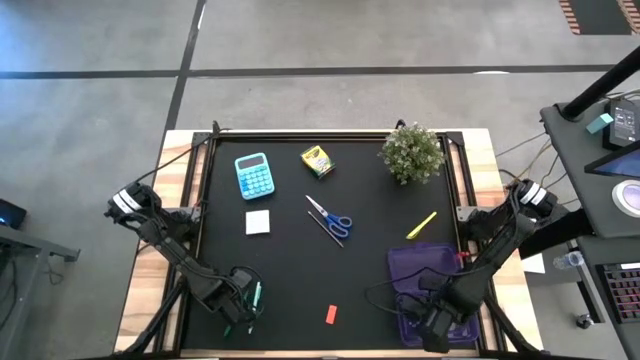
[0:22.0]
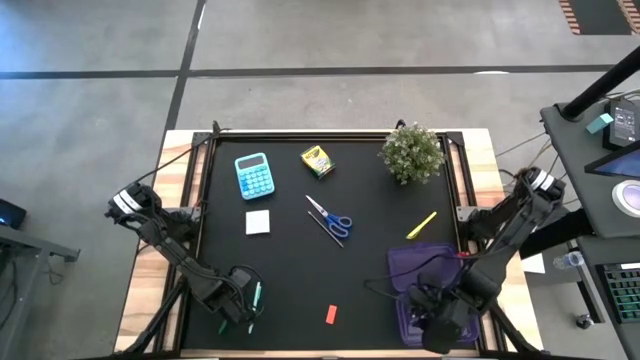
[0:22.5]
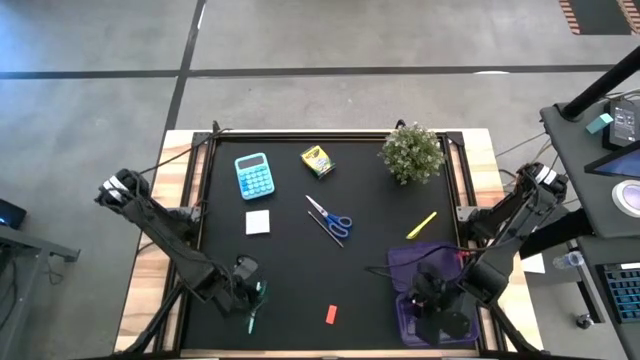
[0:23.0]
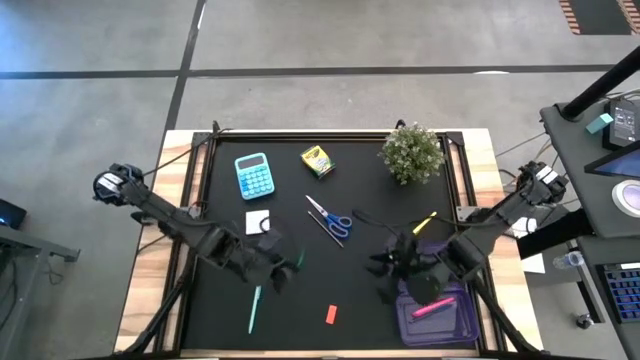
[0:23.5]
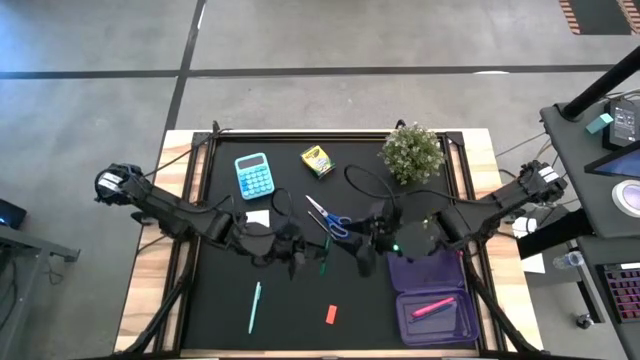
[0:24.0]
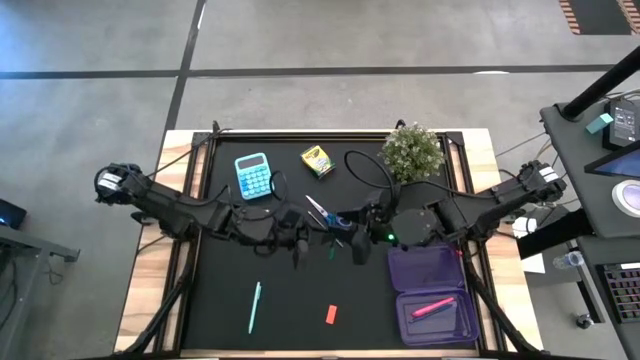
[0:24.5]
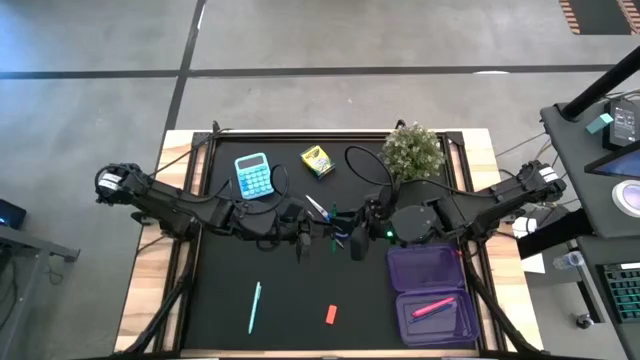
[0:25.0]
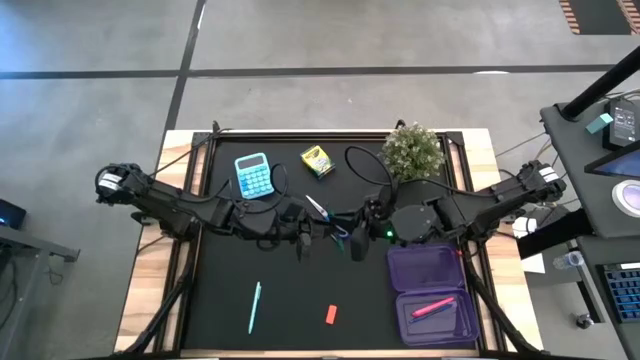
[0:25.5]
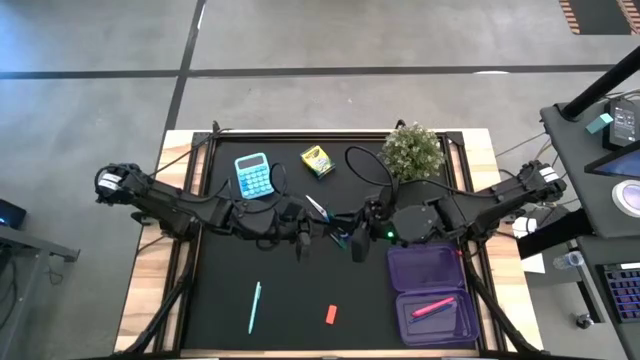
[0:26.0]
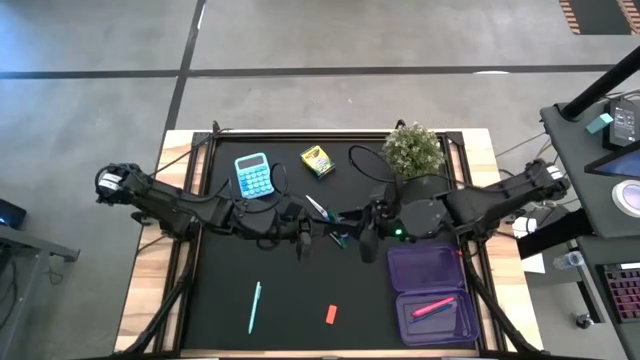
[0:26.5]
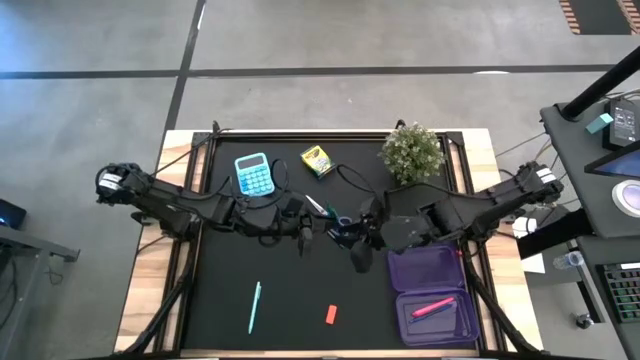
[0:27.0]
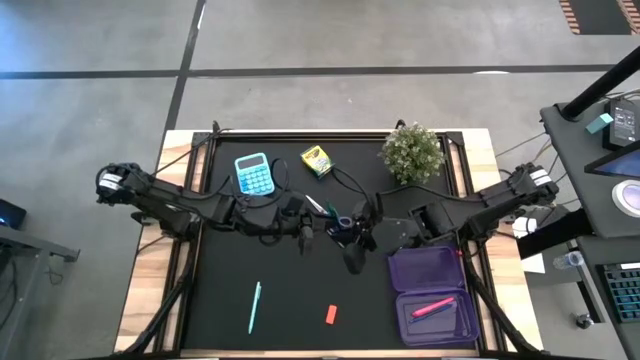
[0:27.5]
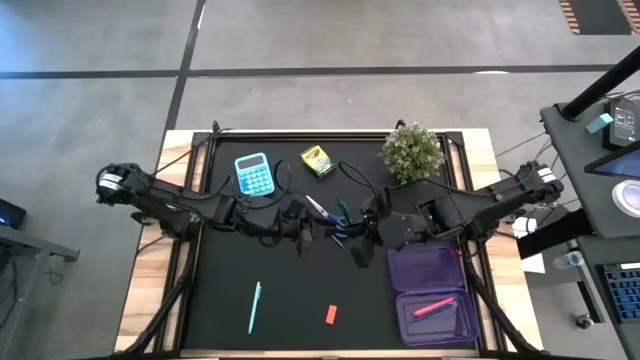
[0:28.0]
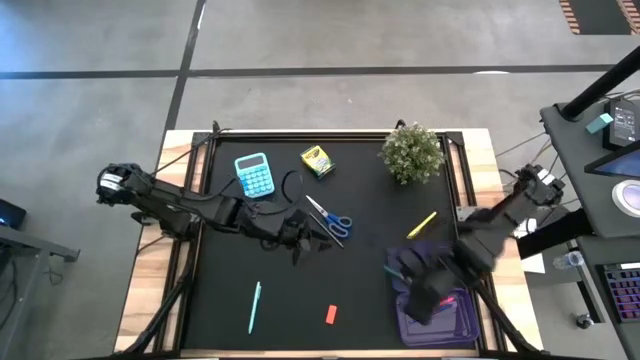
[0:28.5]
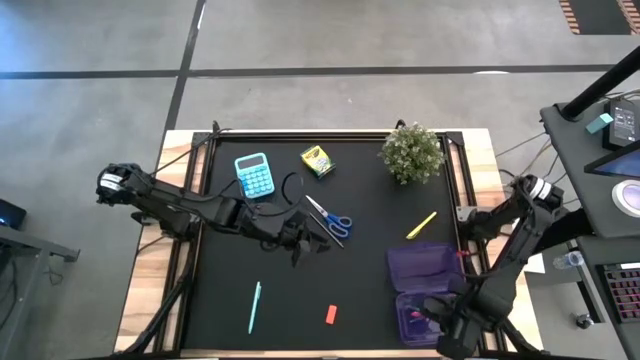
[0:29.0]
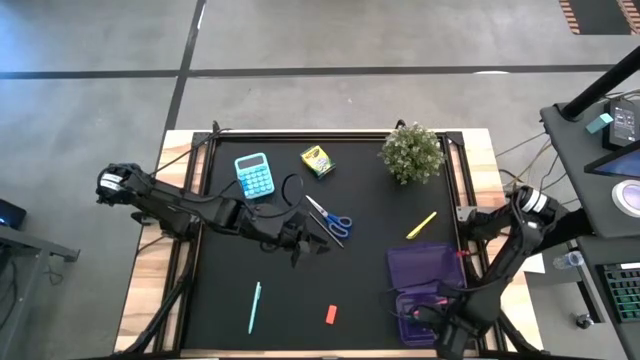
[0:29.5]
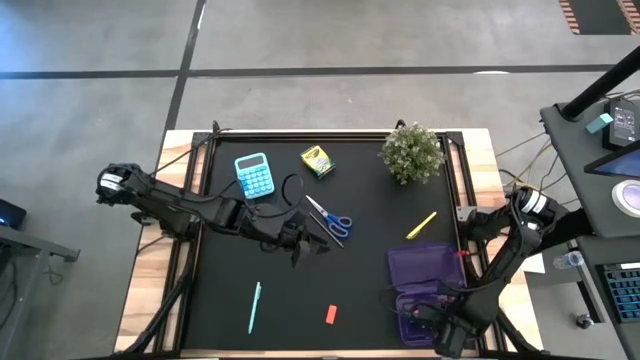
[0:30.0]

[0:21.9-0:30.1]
Task: Pack school essentials
Put the green pen into the supply box

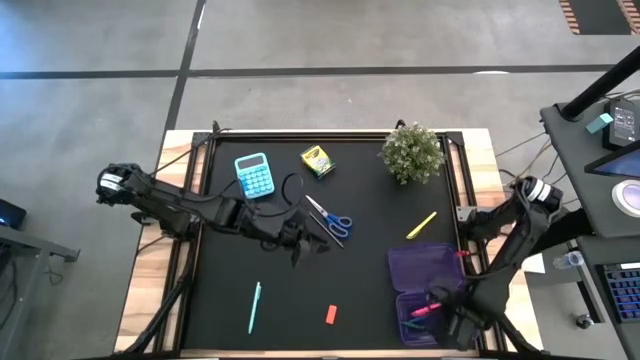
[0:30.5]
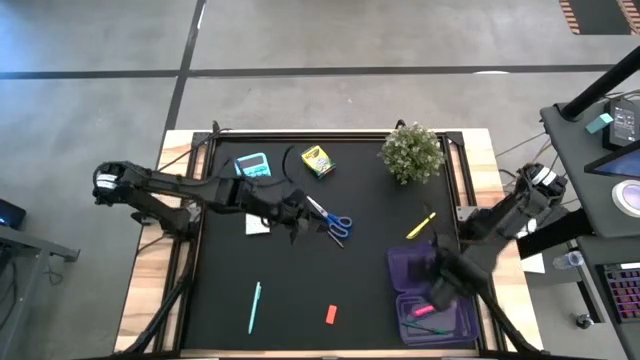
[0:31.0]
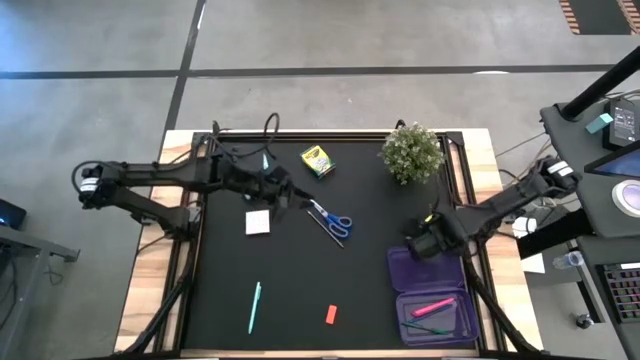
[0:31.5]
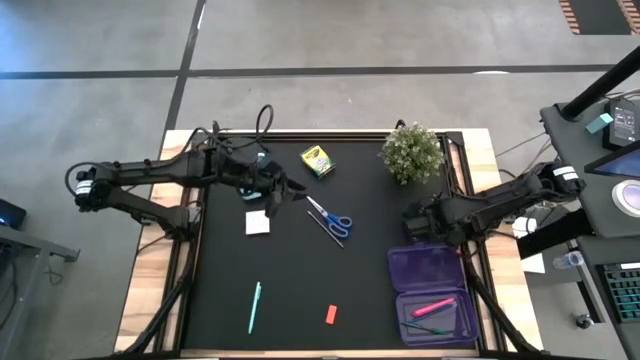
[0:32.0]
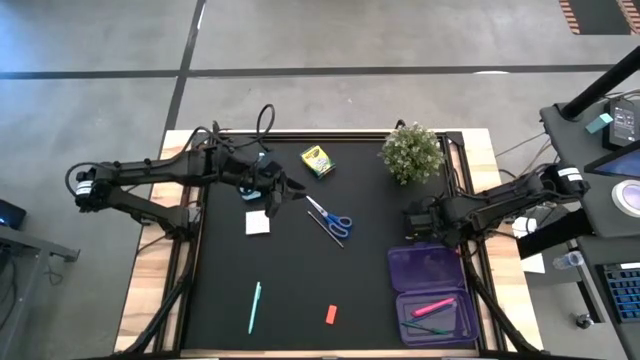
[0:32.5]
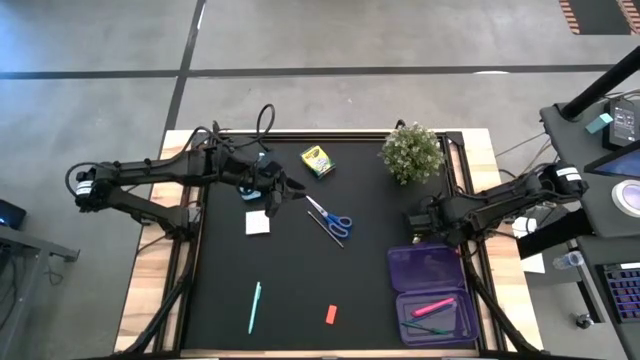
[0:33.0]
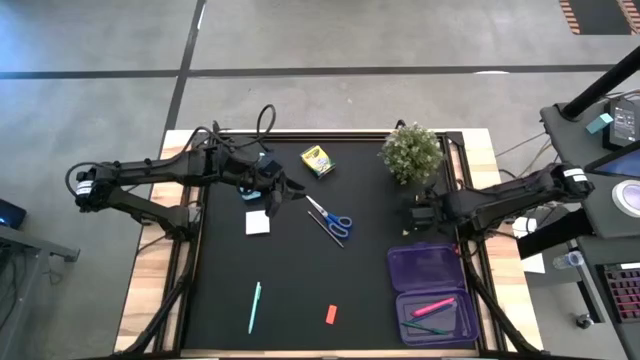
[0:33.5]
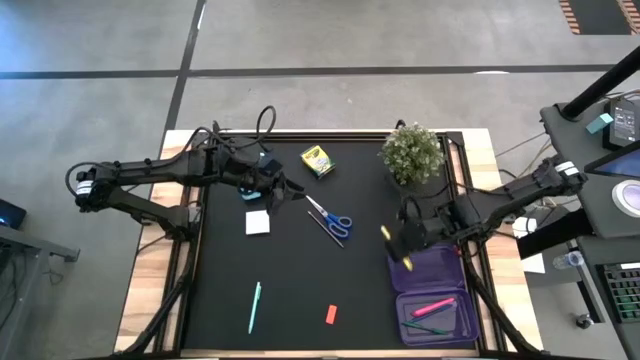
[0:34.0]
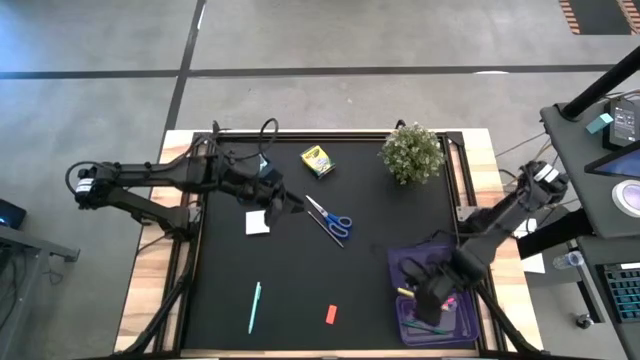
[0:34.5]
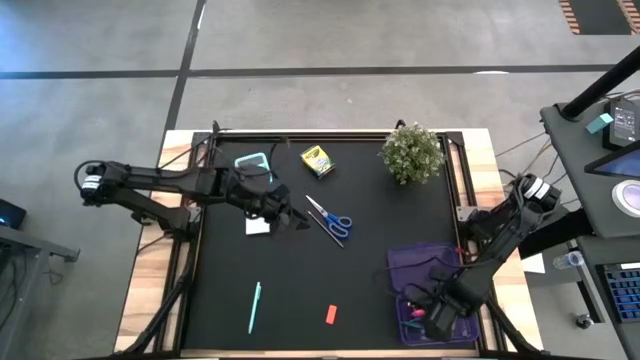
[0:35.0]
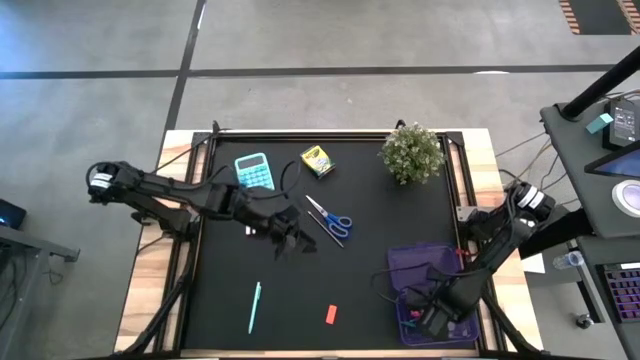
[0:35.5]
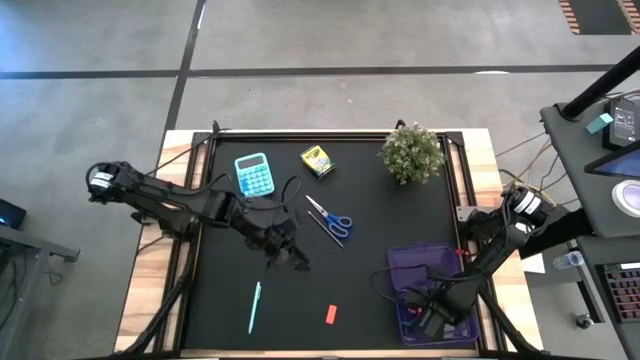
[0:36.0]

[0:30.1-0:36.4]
Put the yellow pen into the supply box

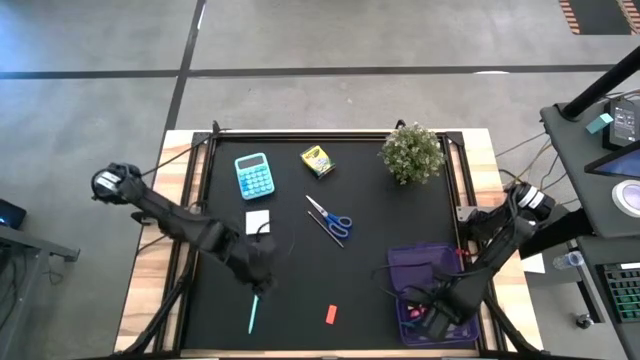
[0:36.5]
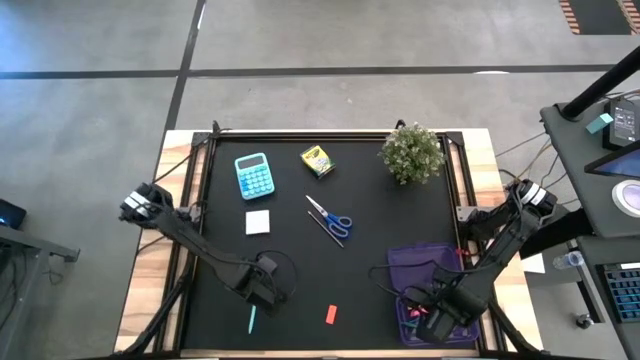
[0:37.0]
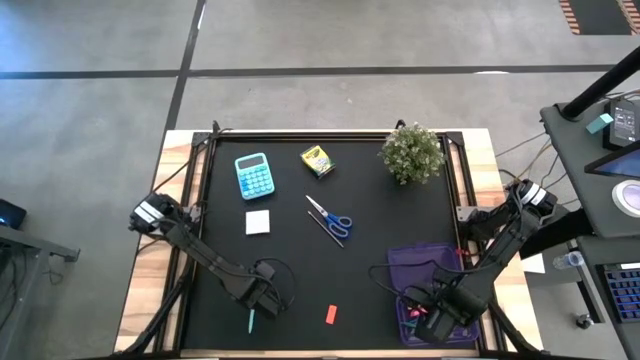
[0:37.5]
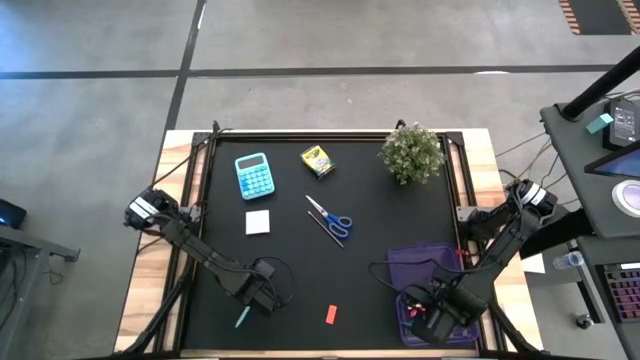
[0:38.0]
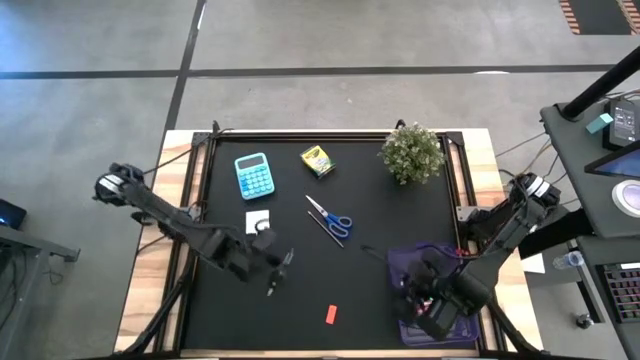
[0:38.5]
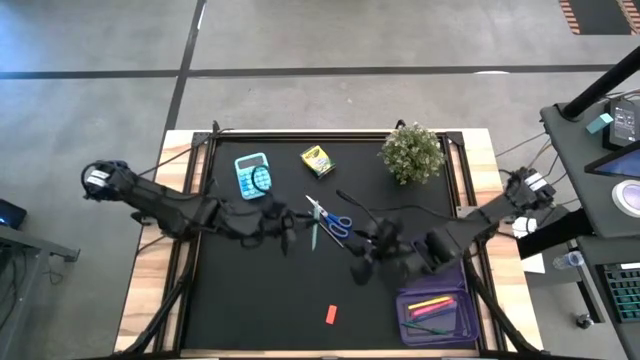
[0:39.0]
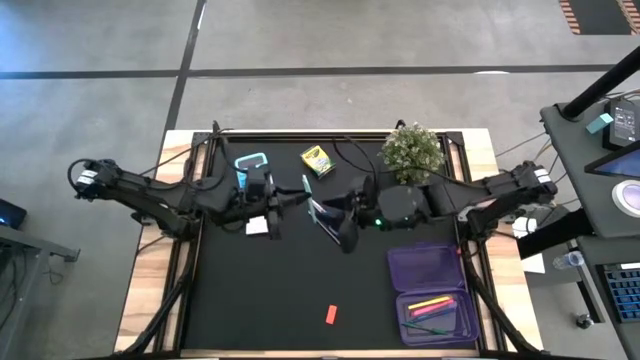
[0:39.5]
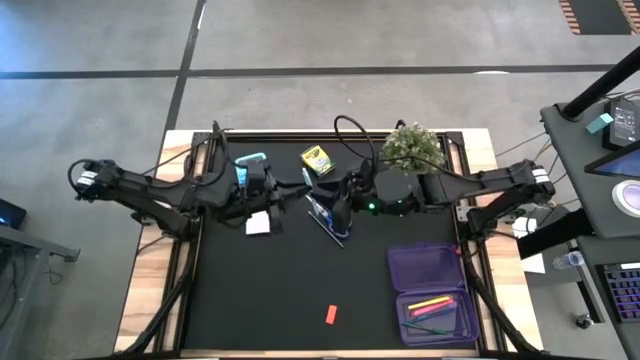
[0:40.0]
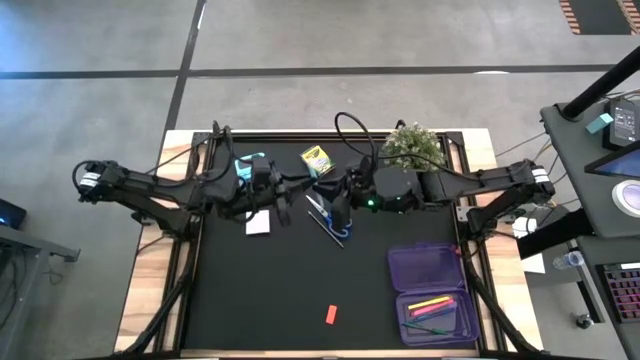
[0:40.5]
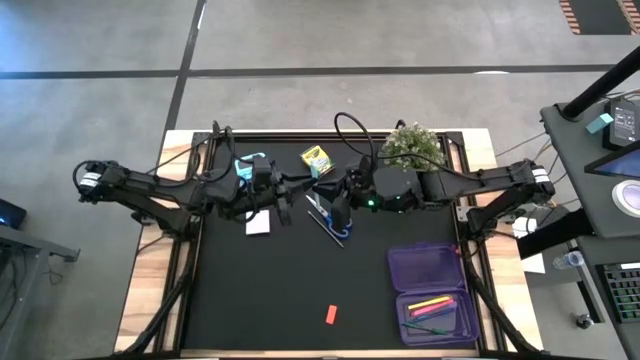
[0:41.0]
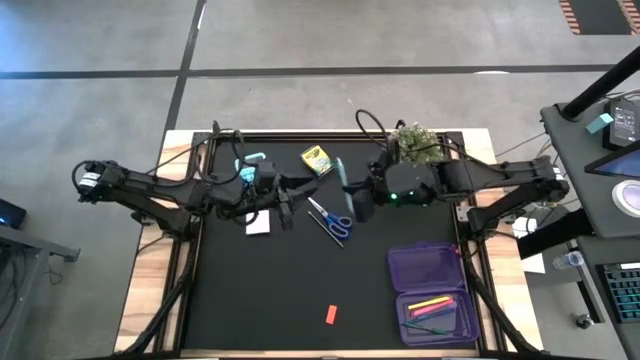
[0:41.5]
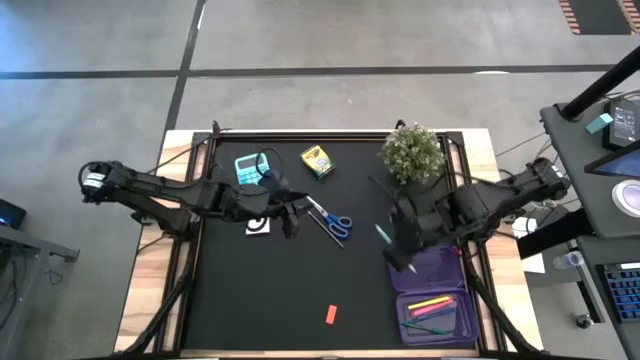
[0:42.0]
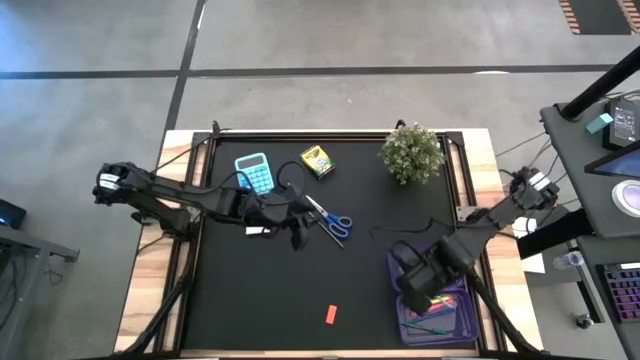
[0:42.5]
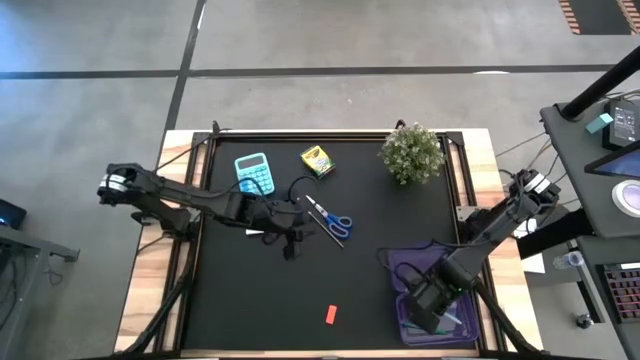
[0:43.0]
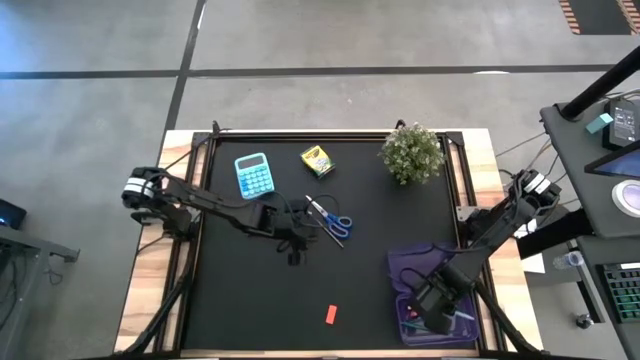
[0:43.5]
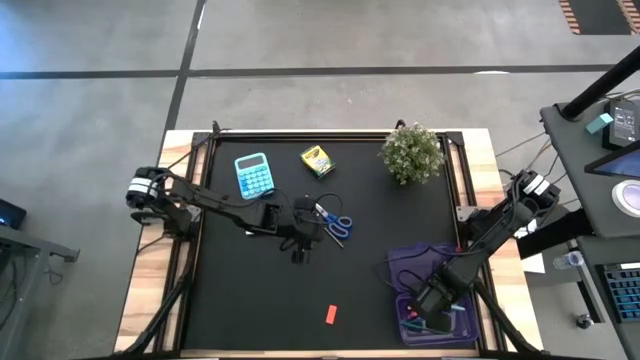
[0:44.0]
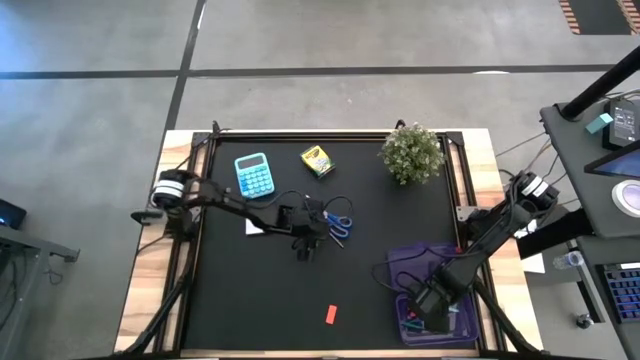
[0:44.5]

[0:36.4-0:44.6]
Put the light blue pen into the supply box
